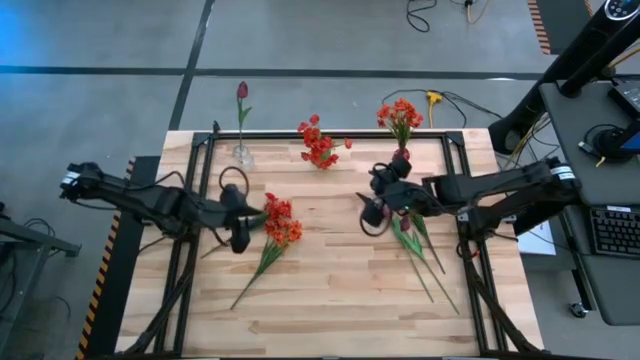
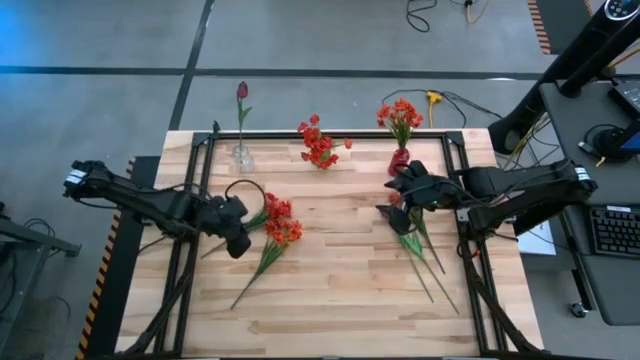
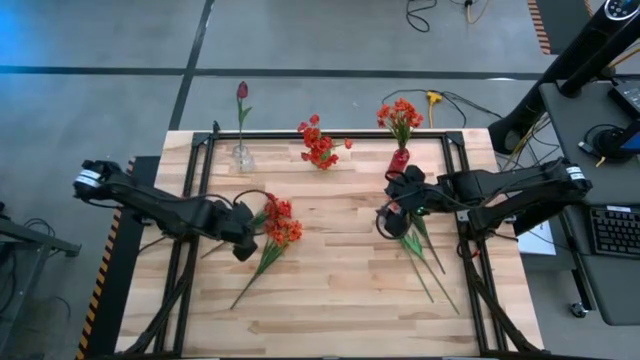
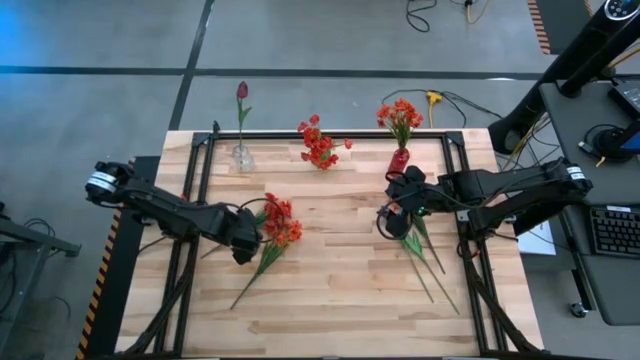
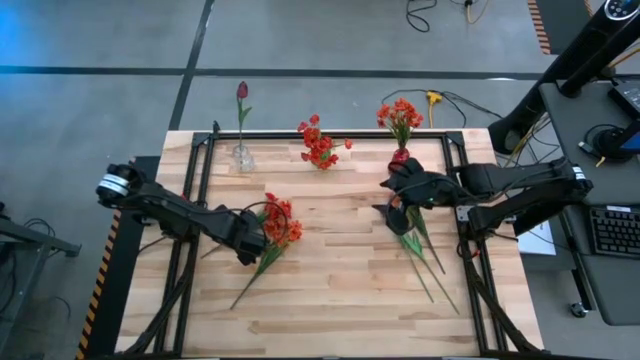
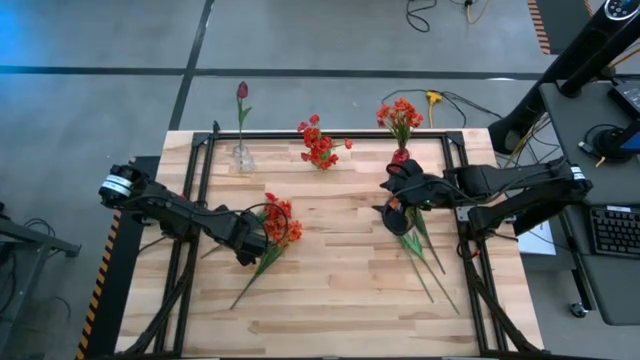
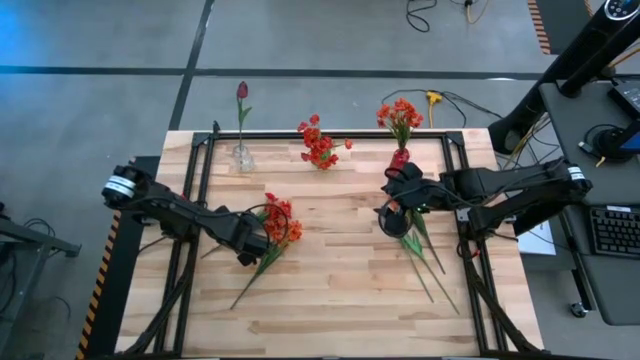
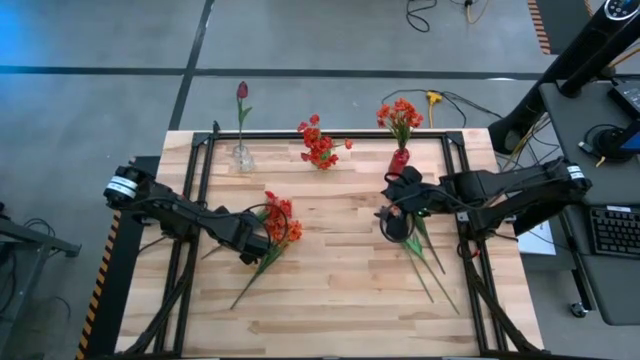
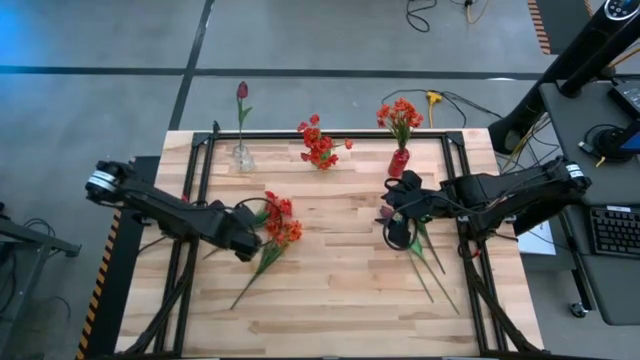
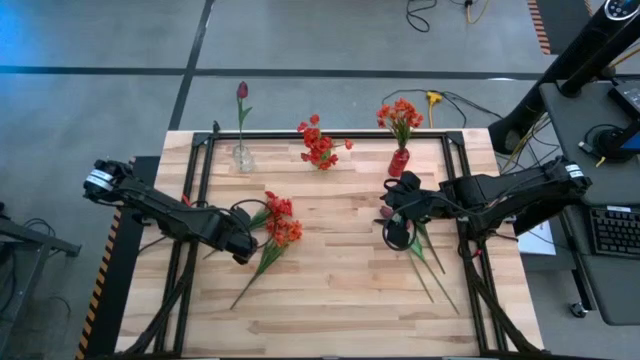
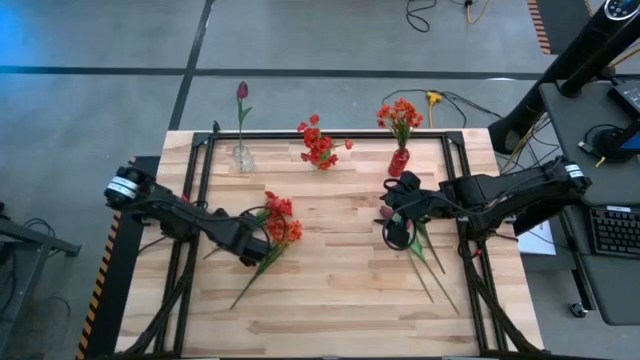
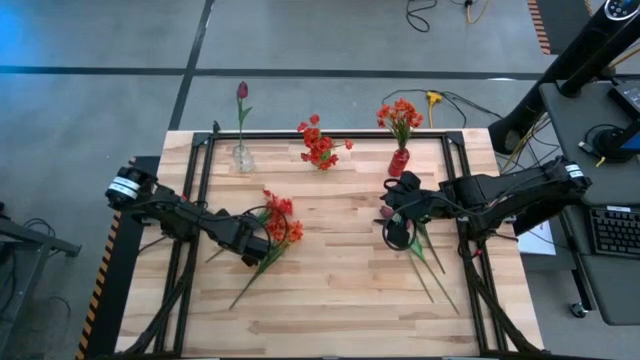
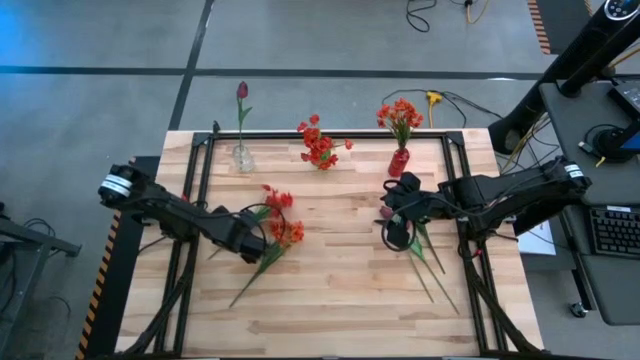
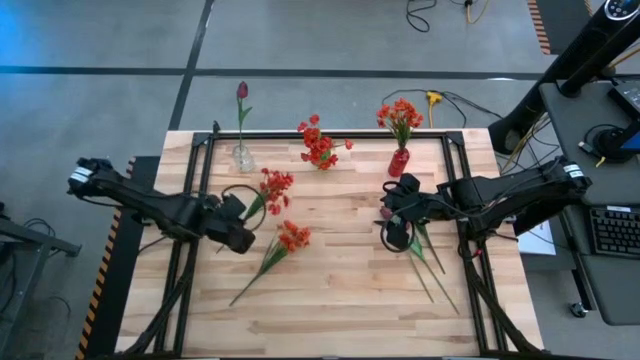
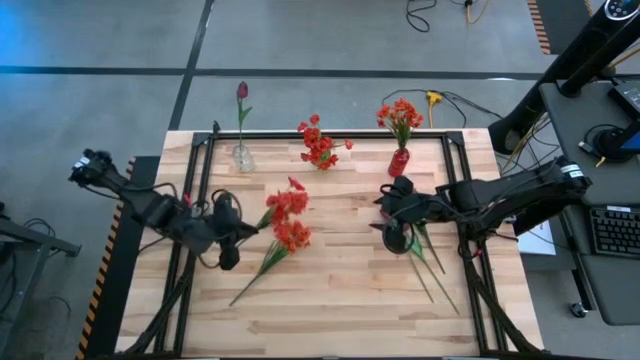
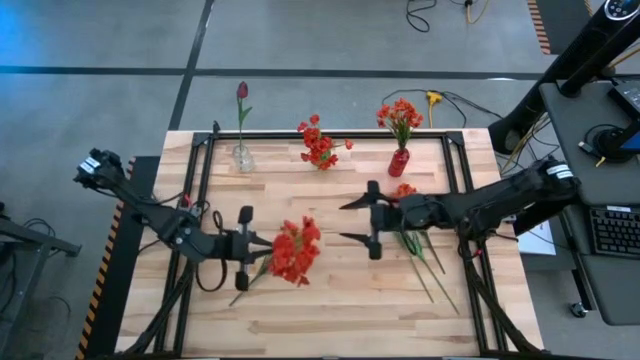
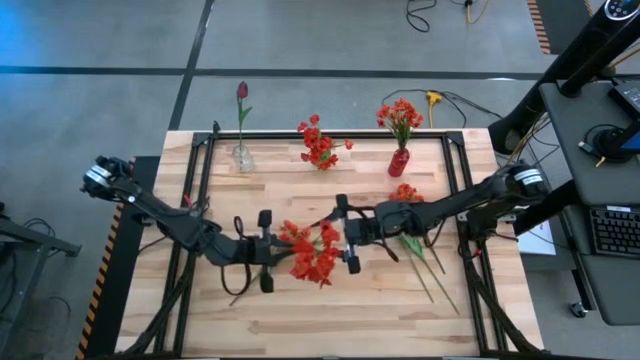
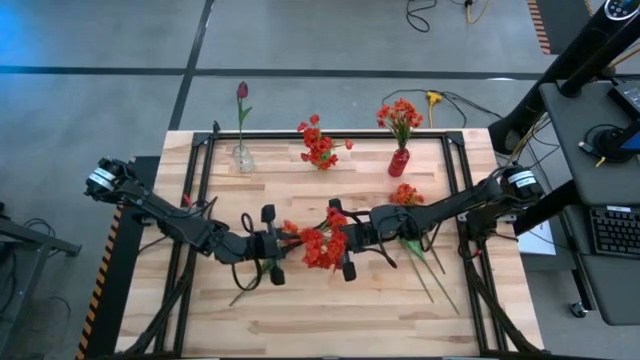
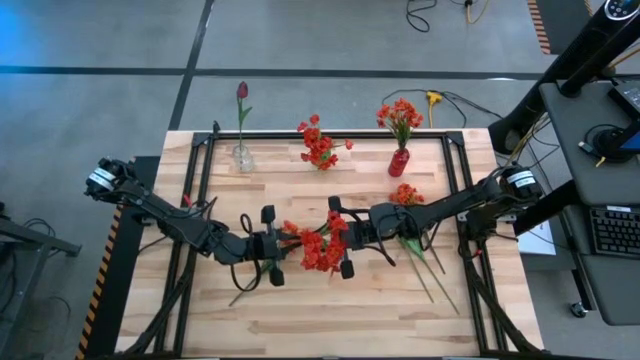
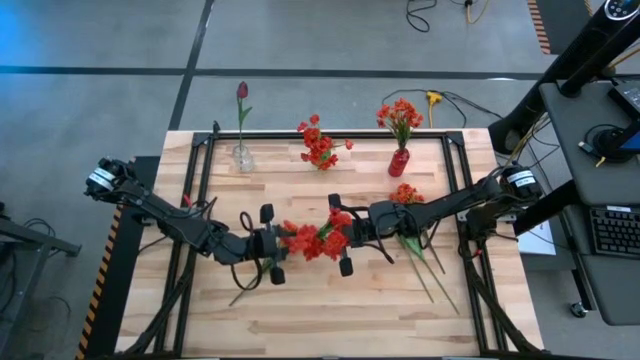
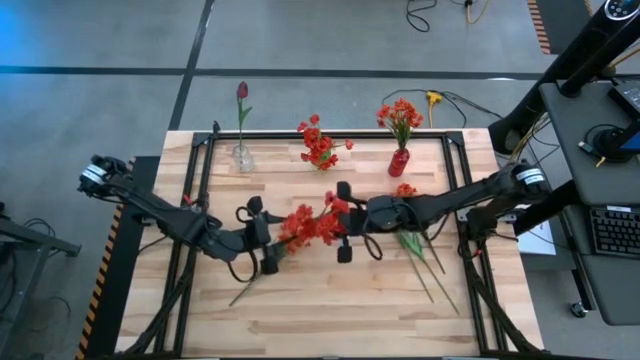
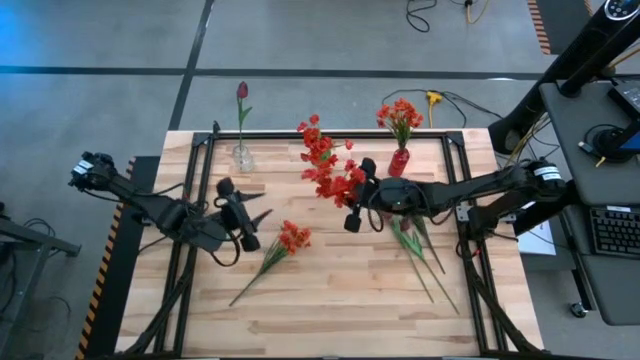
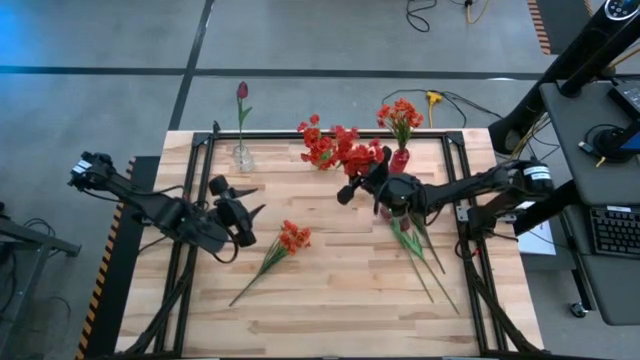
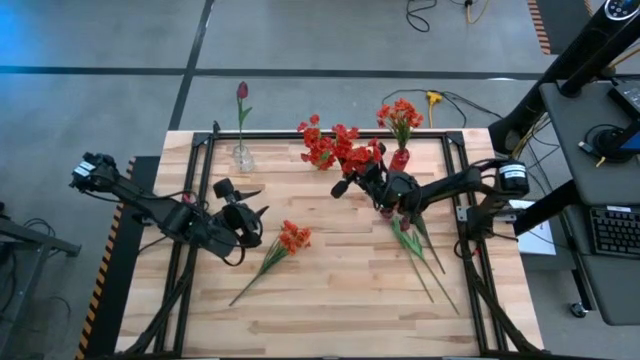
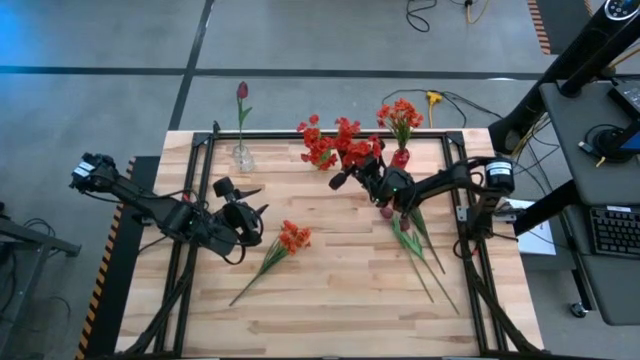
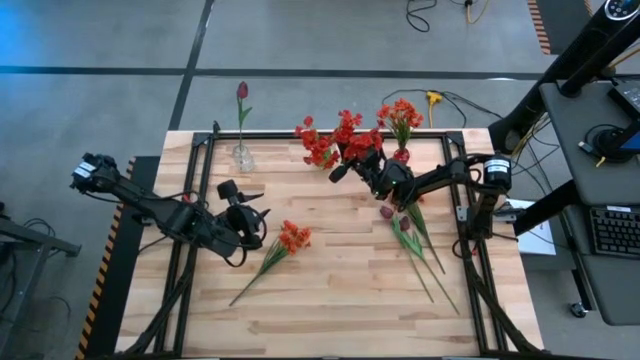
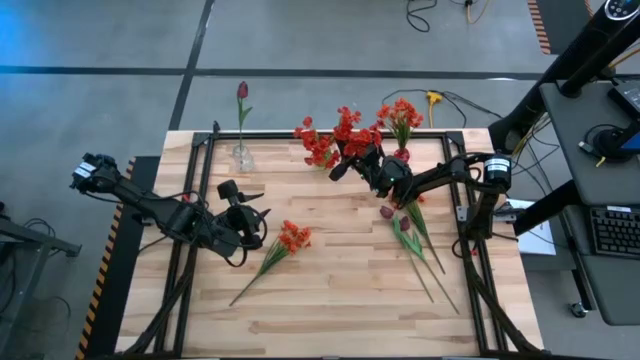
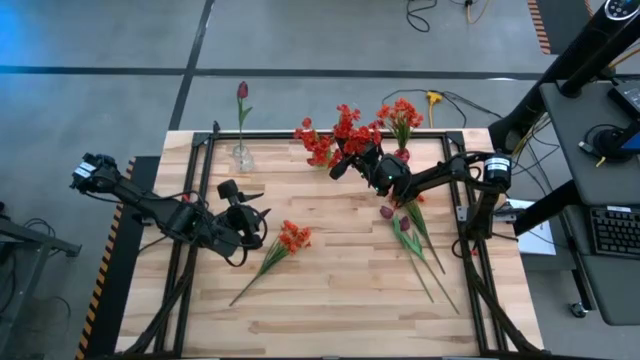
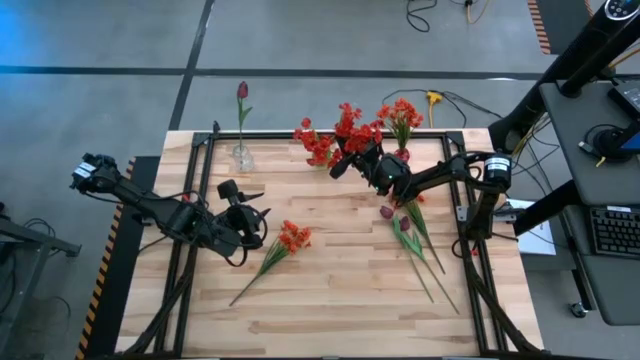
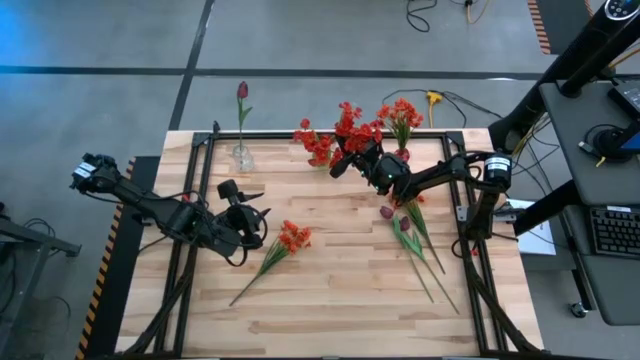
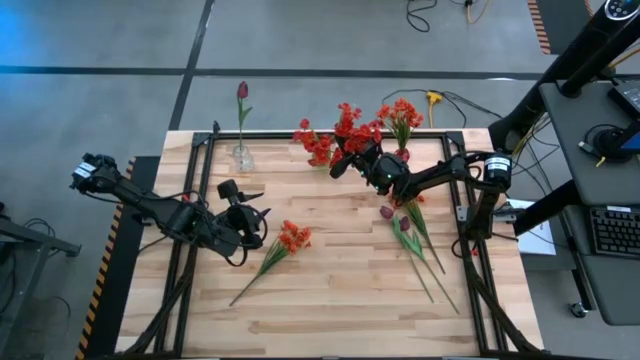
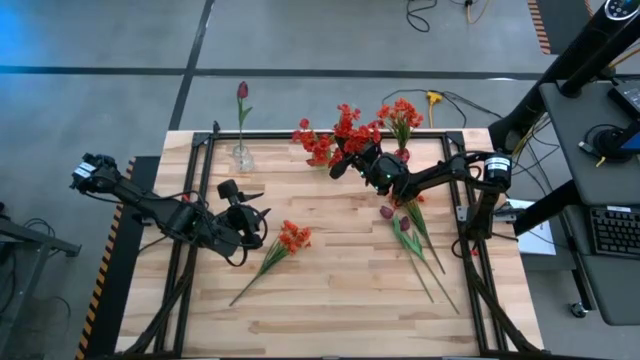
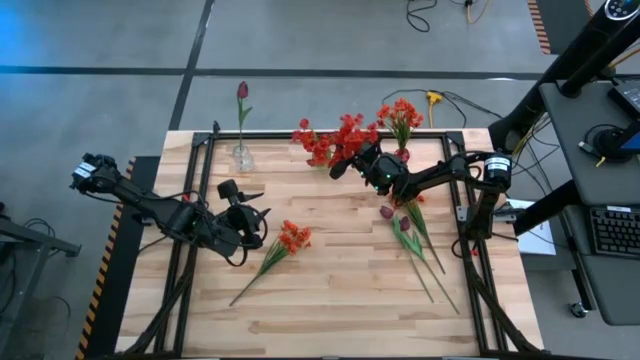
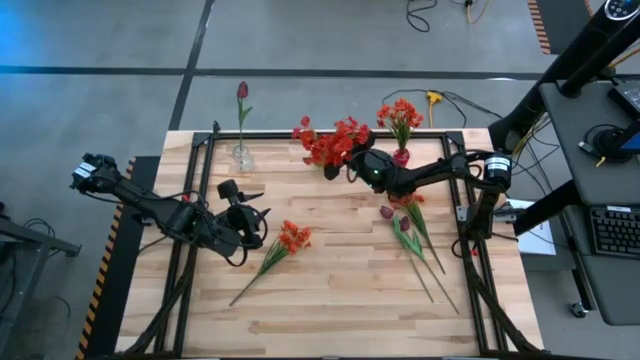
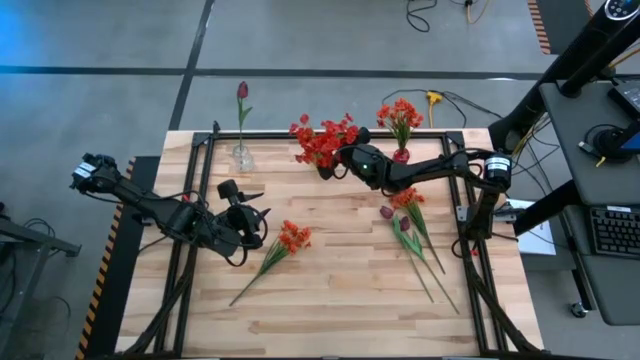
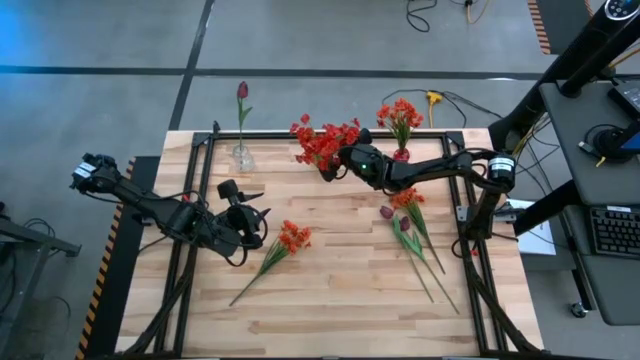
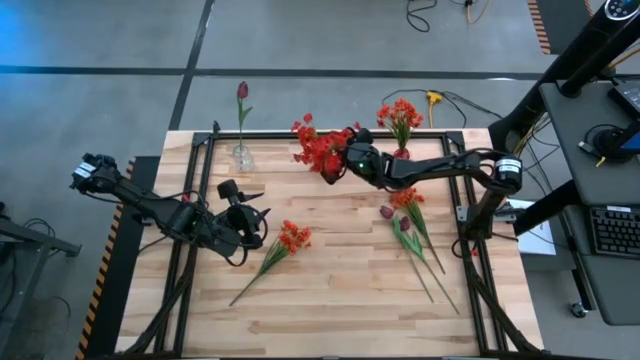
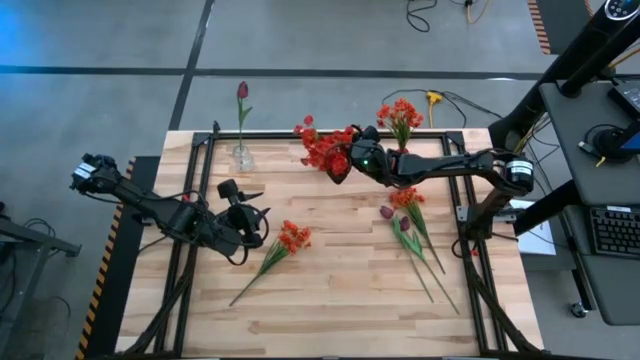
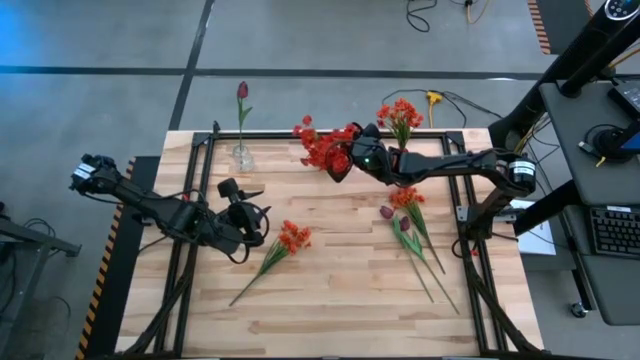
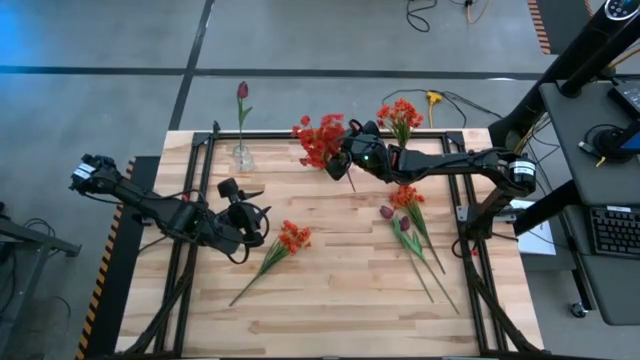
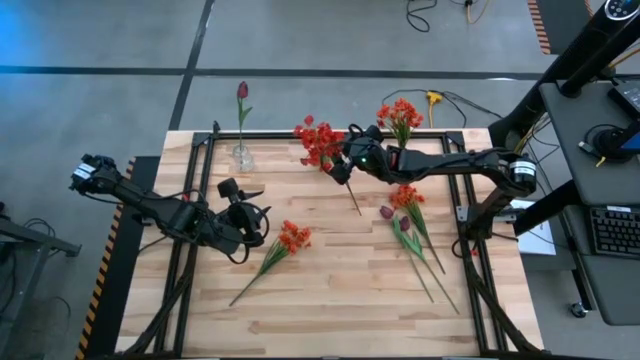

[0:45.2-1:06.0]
Task: Sort flowers into vase by color
Put the red flower into the green vase
